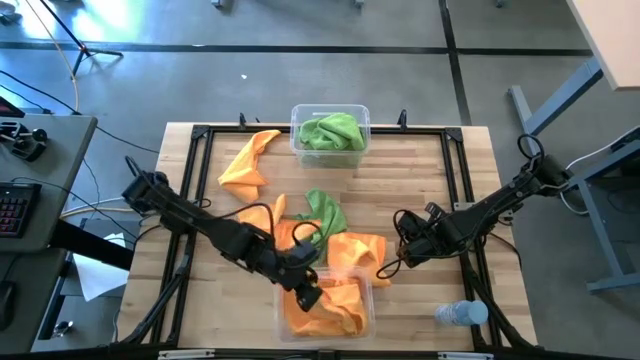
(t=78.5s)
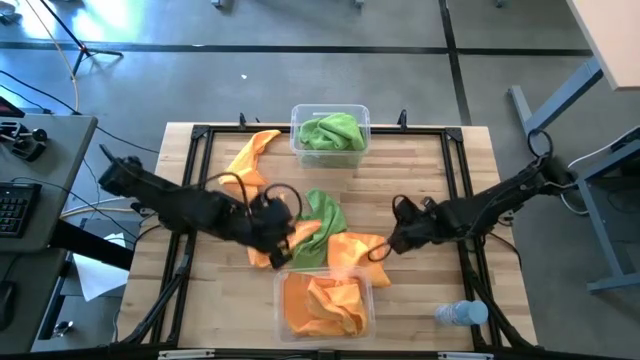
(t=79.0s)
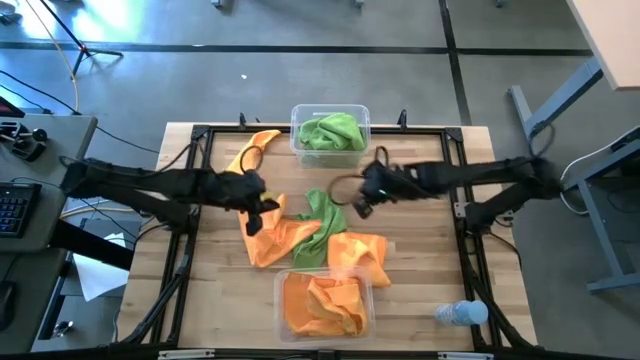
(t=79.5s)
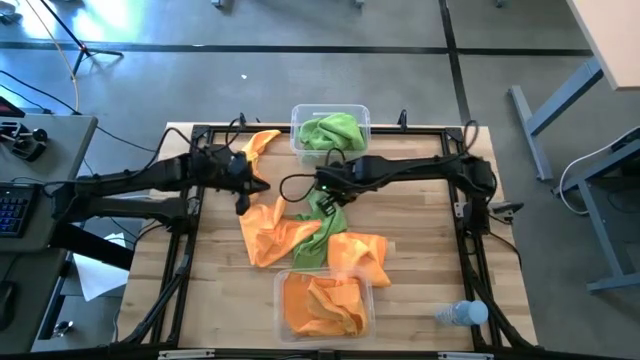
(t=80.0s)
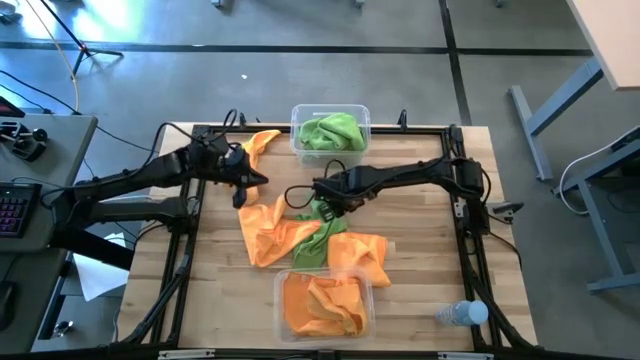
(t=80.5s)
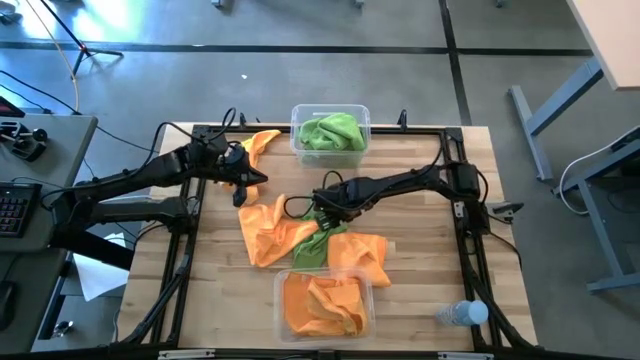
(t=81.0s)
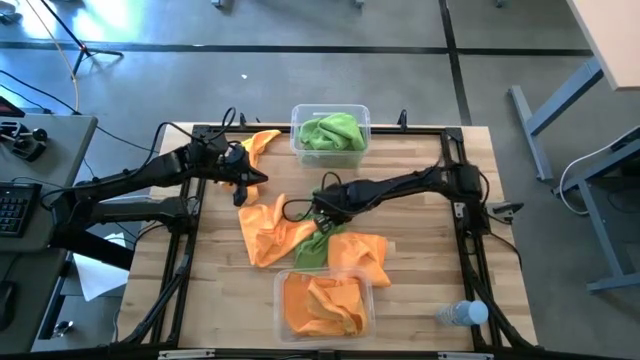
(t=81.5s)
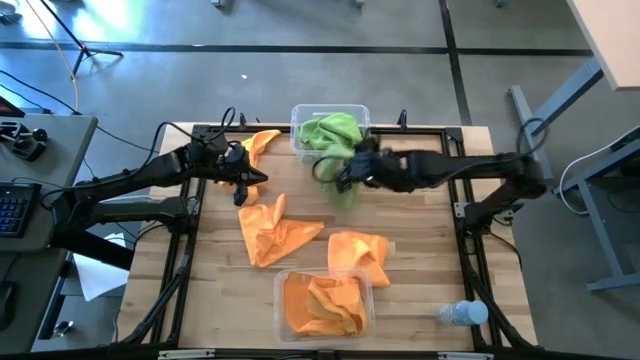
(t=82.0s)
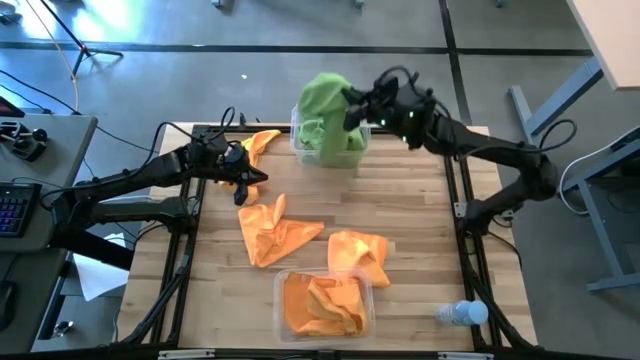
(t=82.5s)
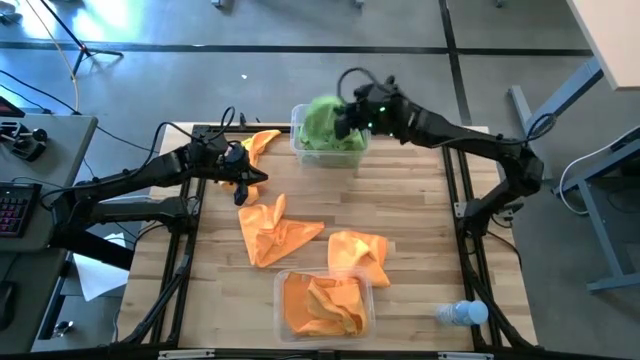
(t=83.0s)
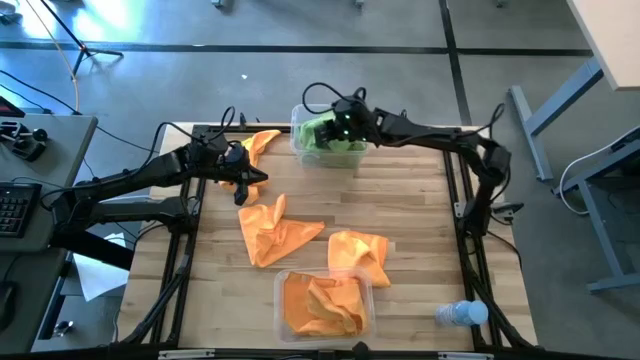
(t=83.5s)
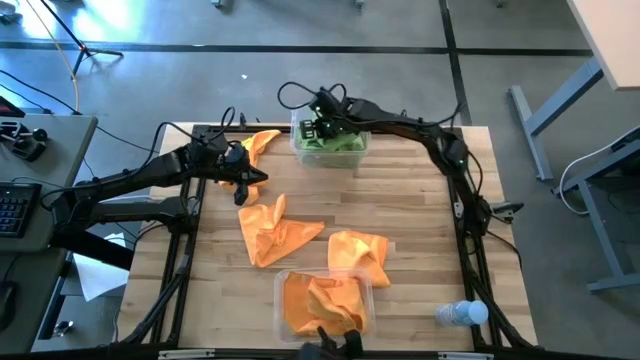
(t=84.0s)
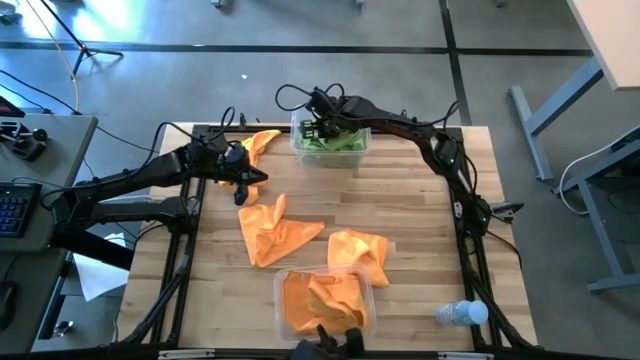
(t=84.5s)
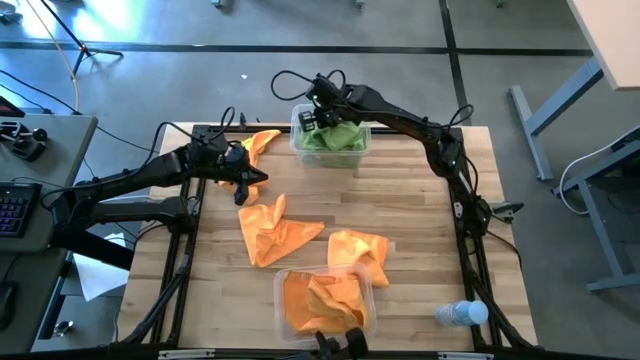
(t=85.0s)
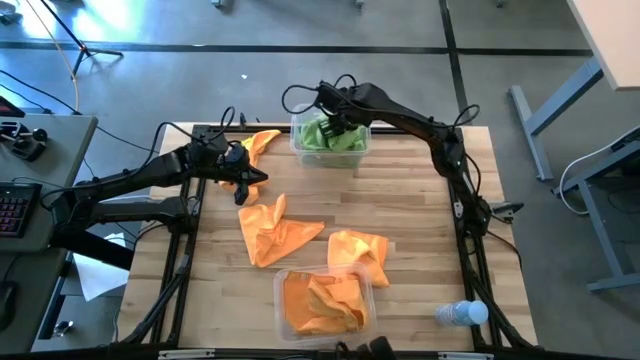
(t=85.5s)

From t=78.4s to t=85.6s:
Task: Sort microfiber towel by color & place in baskets
Put the green towel into the top transparent bin

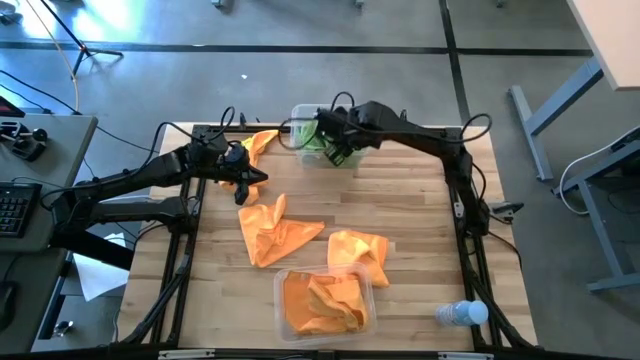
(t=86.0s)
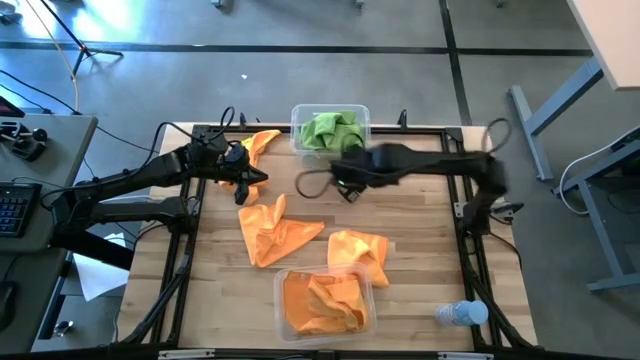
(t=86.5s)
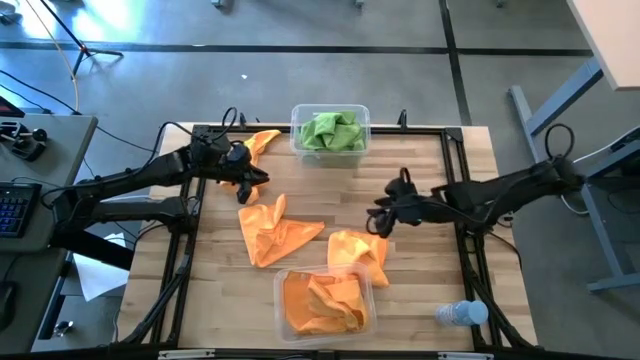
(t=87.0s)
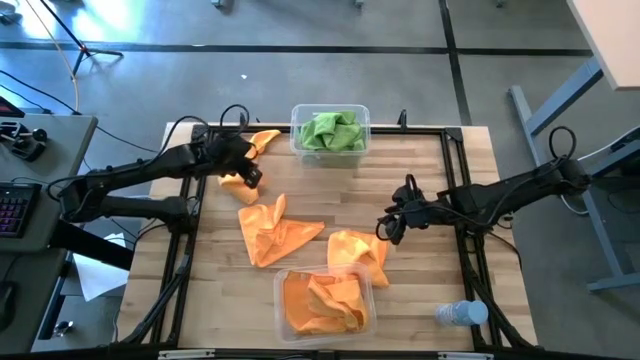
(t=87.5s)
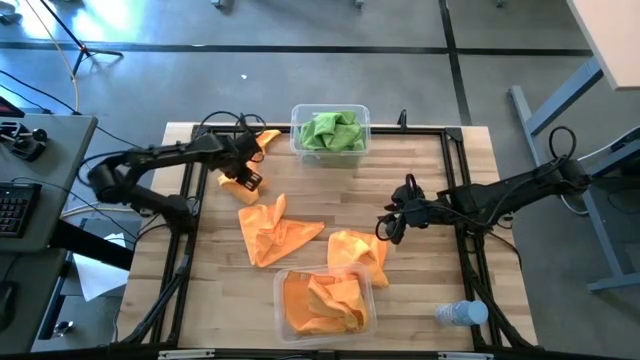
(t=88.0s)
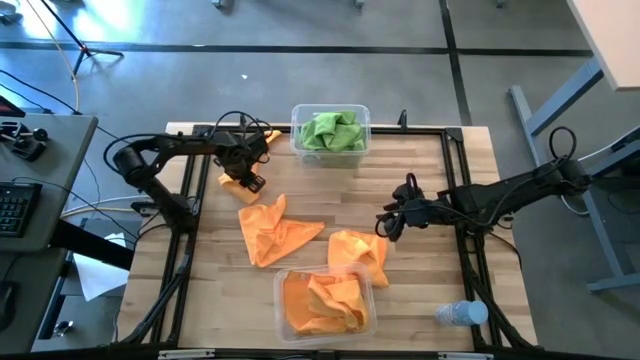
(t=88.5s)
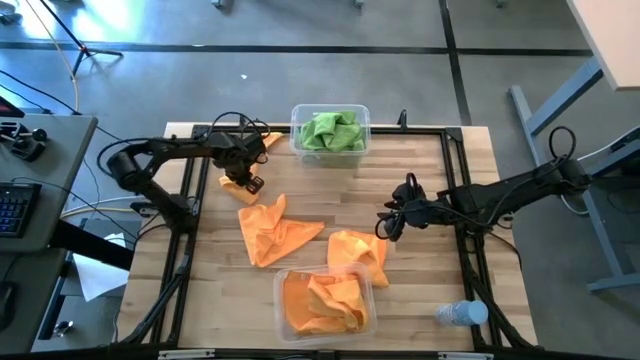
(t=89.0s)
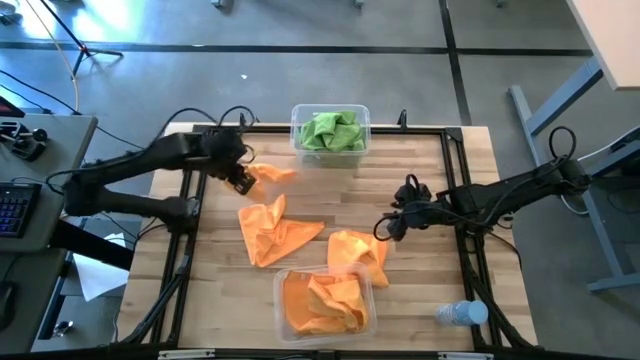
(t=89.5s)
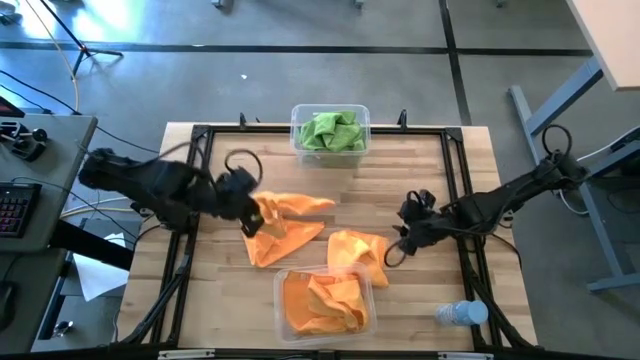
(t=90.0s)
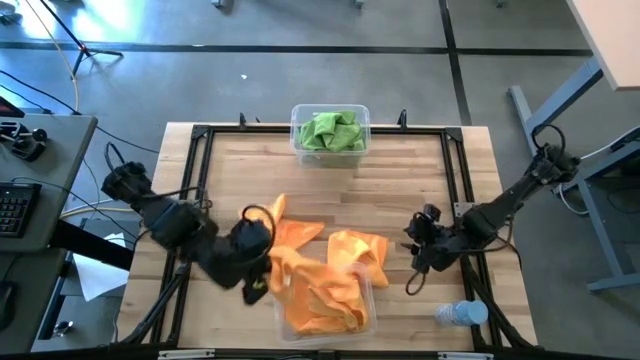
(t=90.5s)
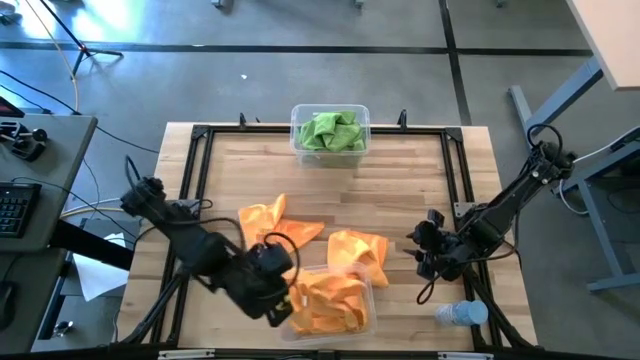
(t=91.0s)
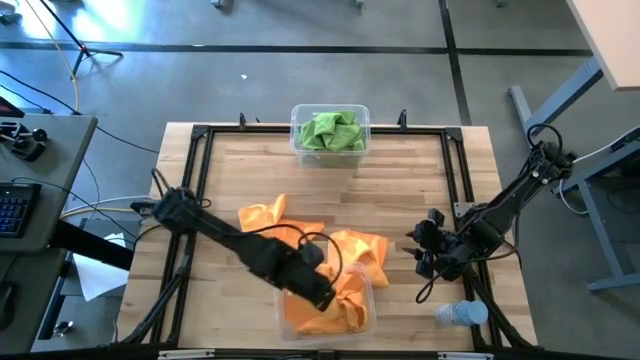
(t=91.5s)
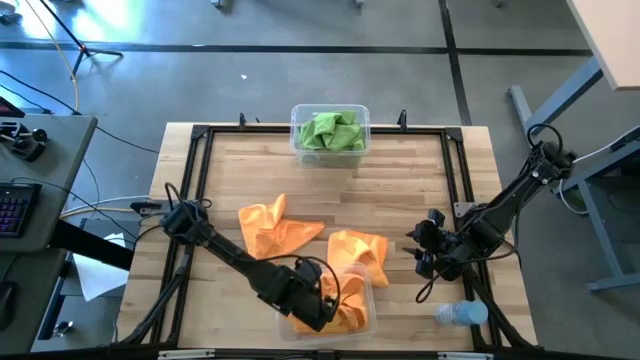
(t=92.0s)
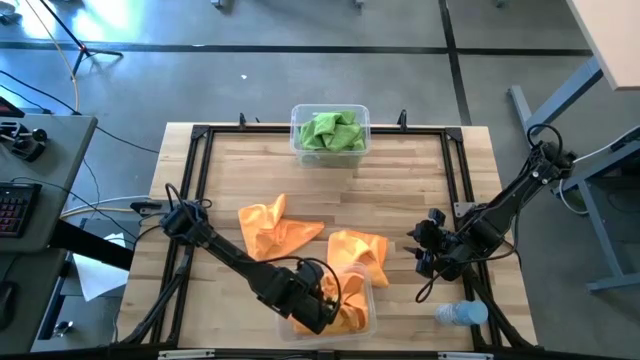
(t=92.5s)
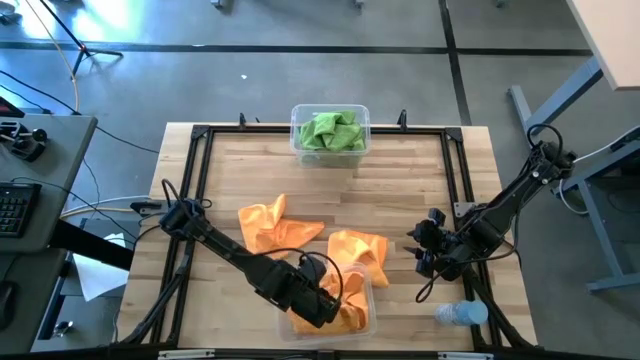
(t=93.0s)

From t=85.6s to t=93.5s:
Put the yellow towel into the bottom transparent bin

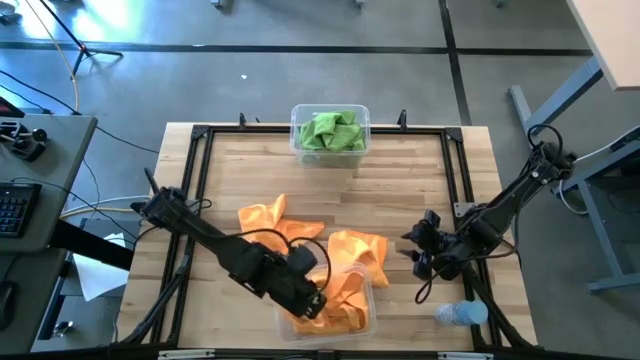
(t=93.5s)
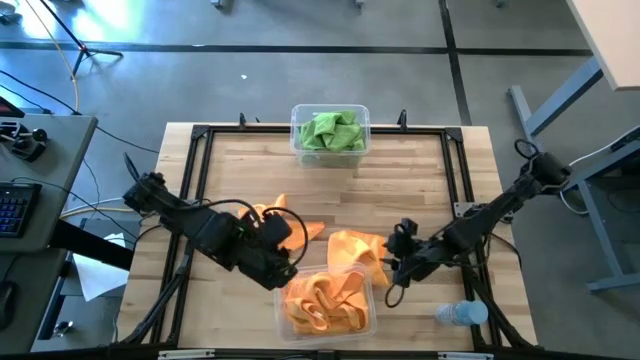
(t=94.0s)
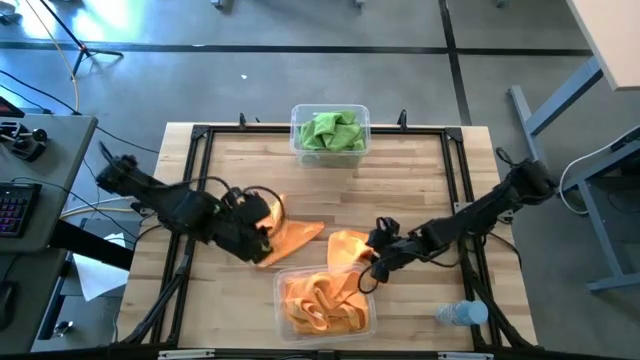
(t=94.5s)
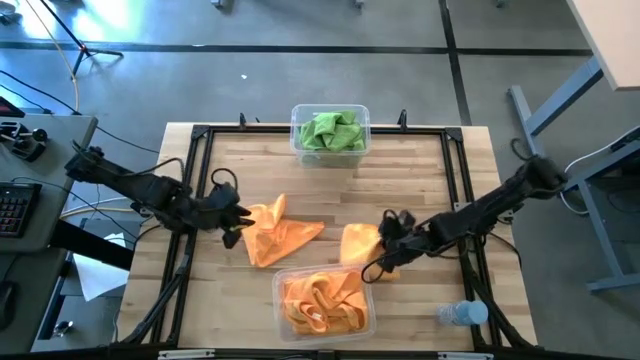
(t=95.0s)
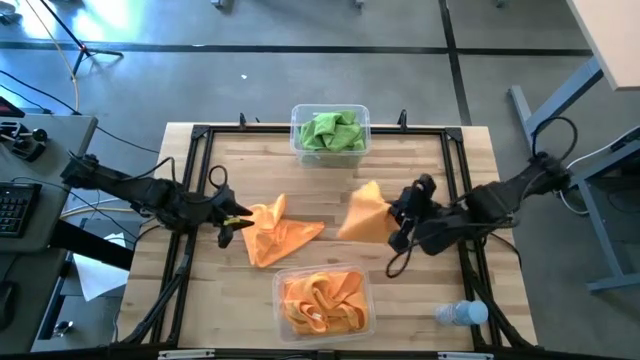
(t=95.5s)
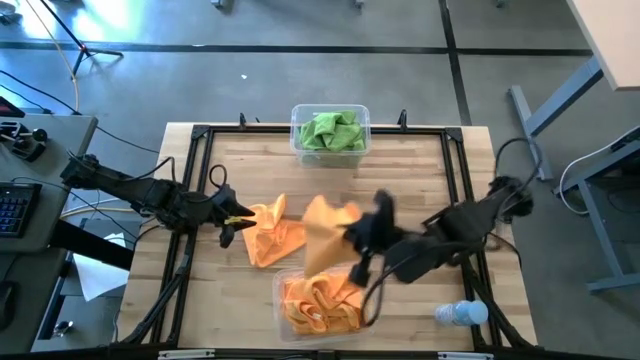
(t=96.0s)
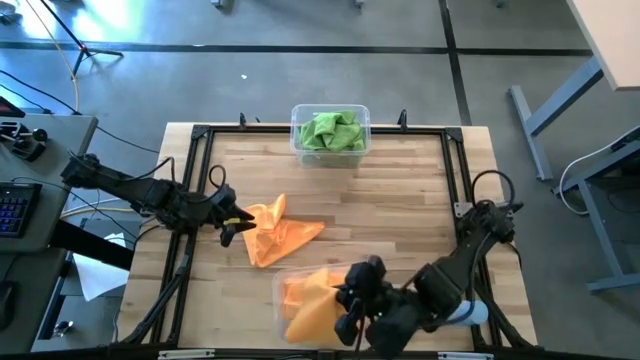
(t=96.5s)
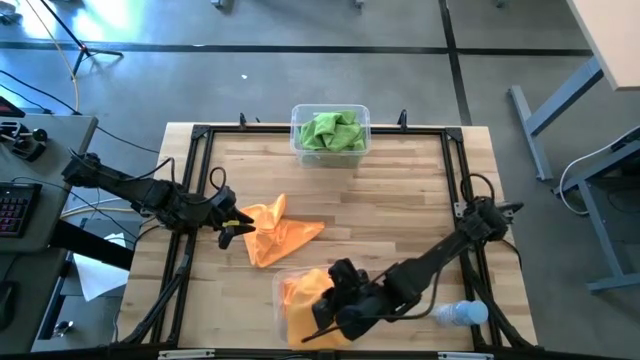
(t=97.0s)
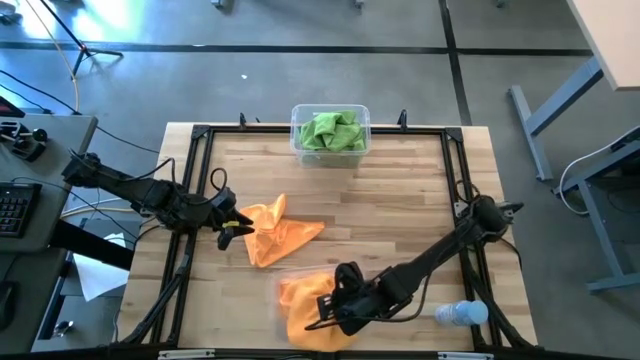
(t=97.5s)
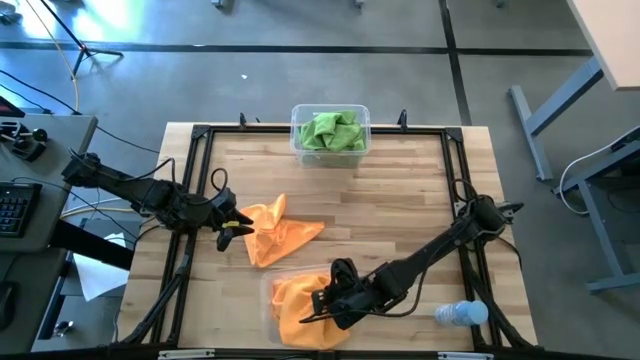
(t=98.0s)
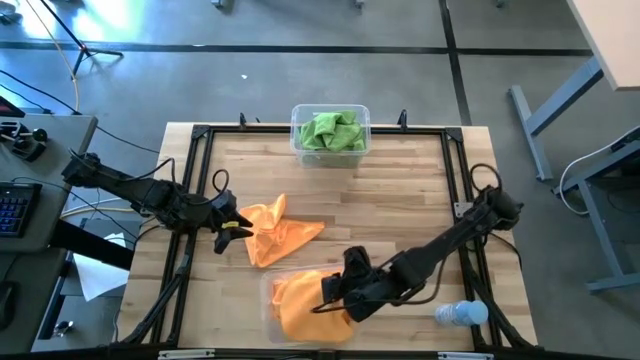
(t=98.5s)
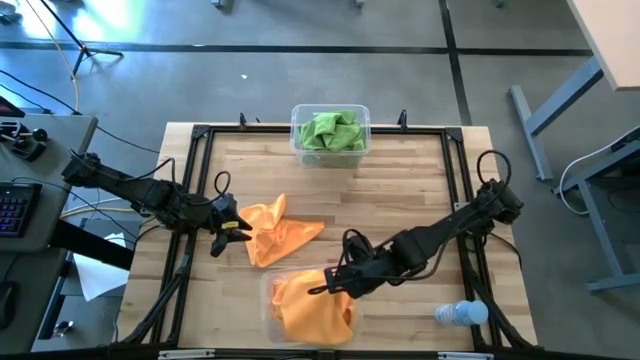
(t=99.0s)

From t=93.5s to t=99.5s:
Put the yellow towel into the bottom transparent bin
